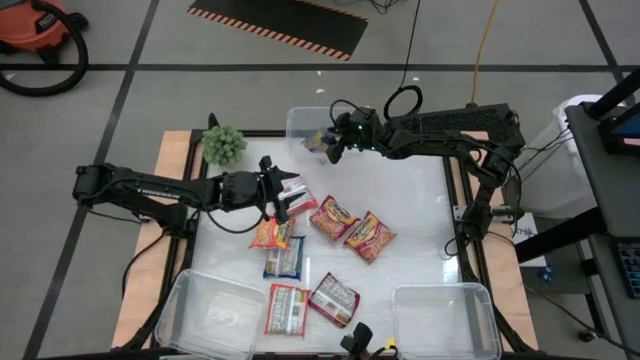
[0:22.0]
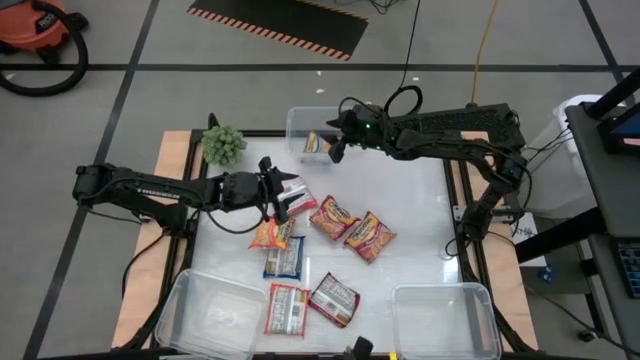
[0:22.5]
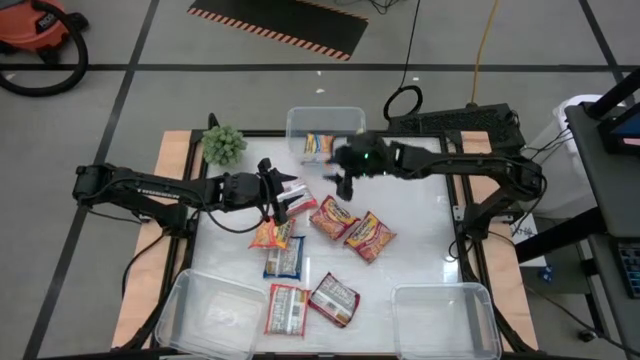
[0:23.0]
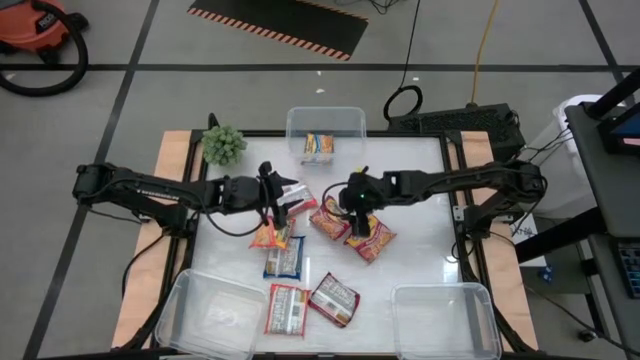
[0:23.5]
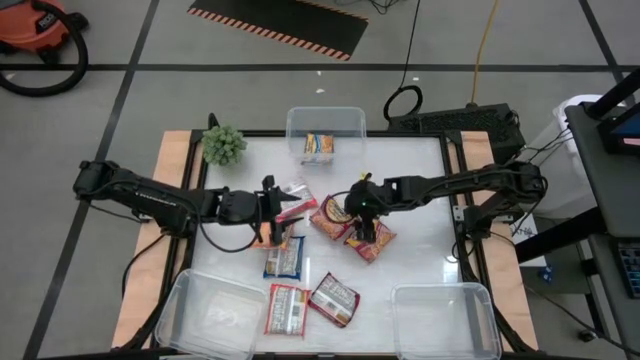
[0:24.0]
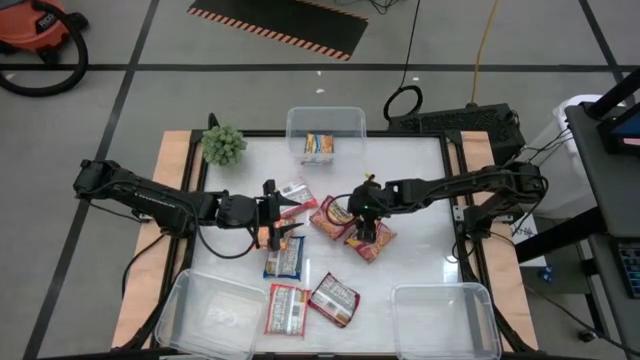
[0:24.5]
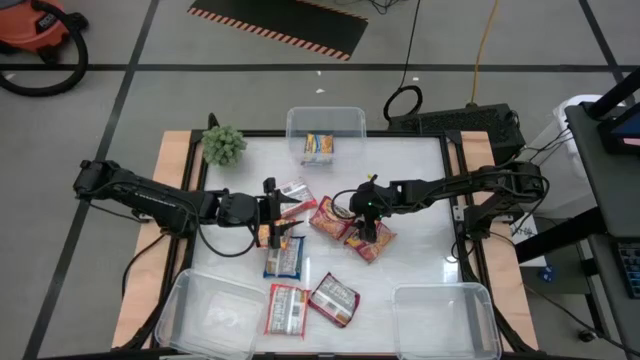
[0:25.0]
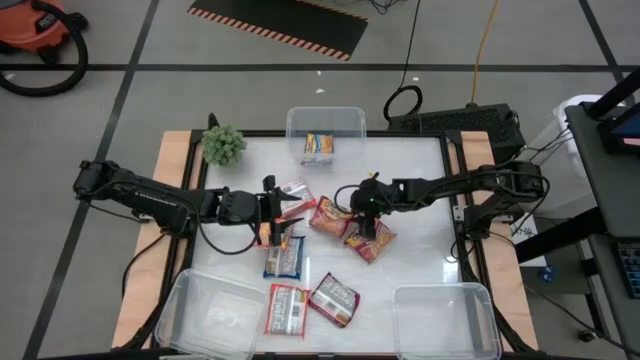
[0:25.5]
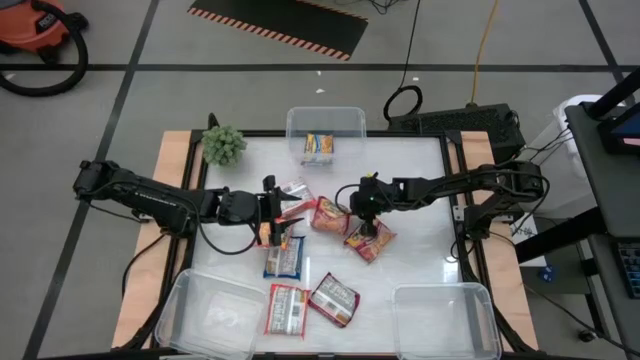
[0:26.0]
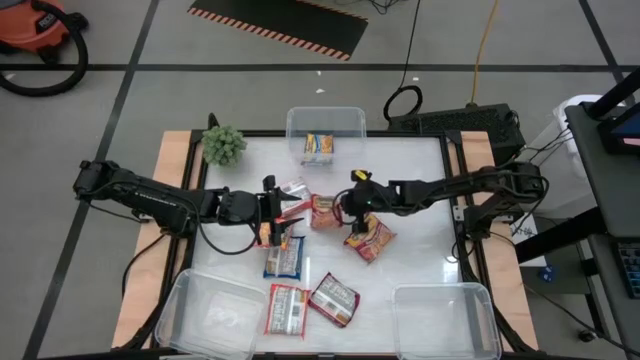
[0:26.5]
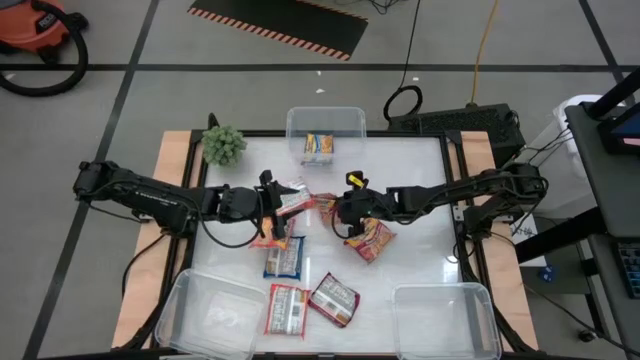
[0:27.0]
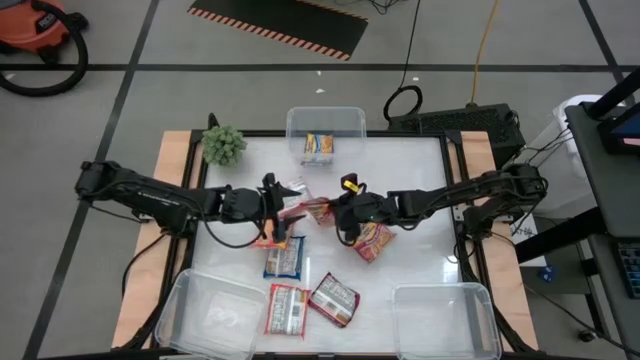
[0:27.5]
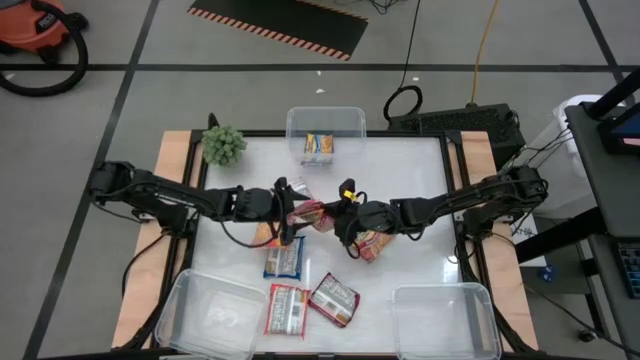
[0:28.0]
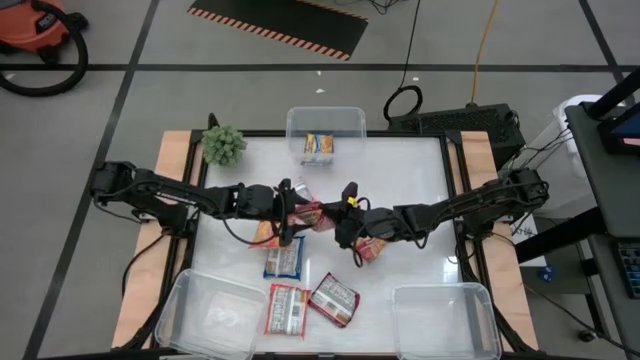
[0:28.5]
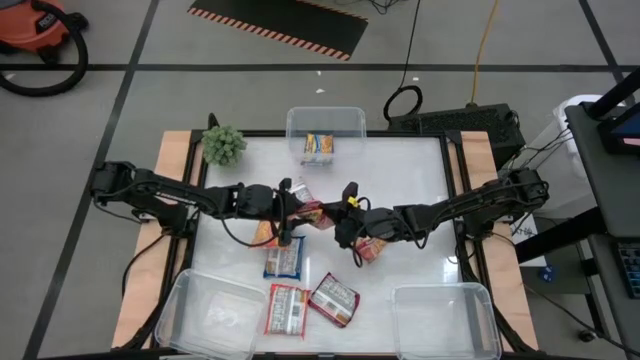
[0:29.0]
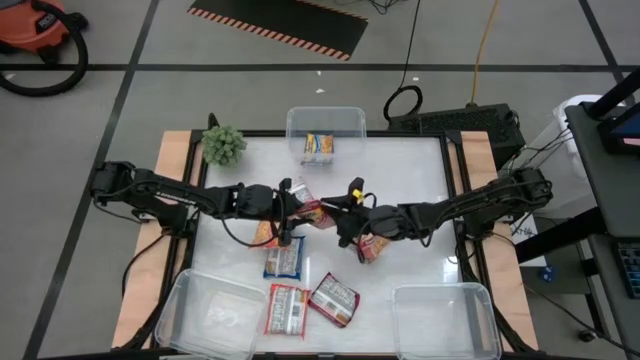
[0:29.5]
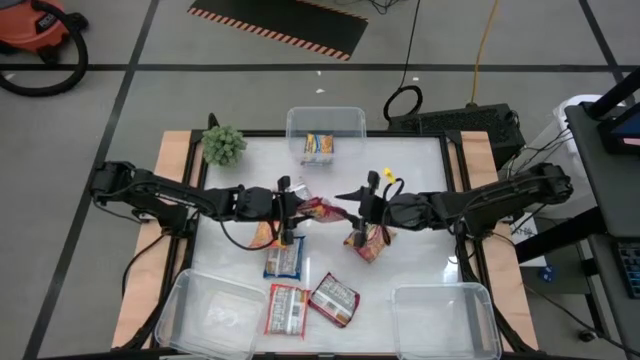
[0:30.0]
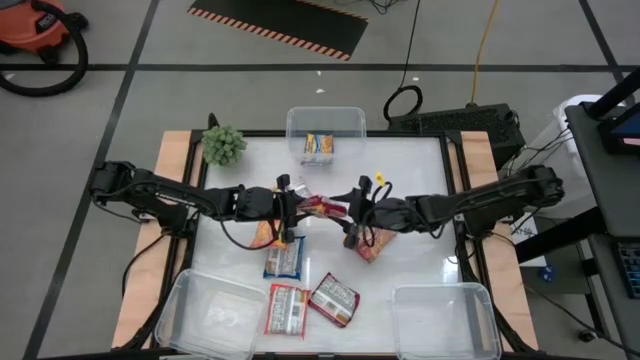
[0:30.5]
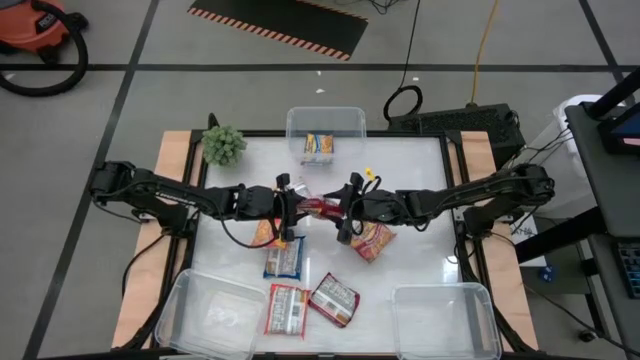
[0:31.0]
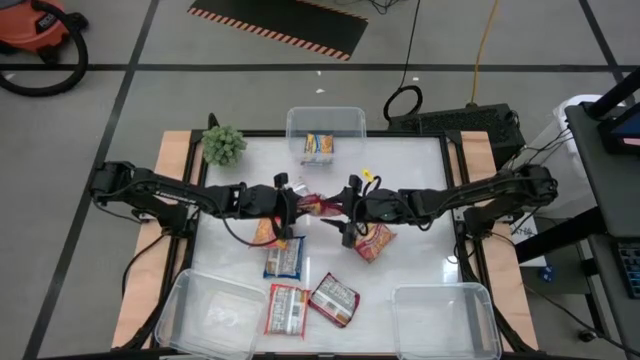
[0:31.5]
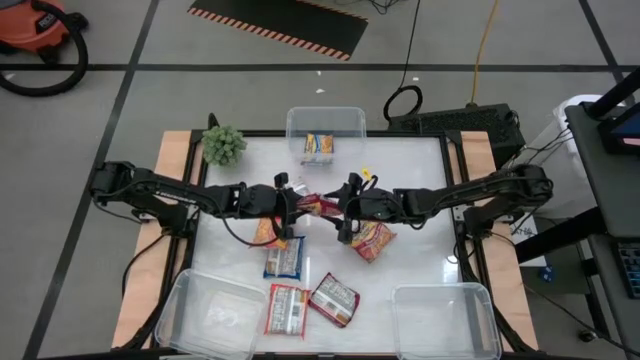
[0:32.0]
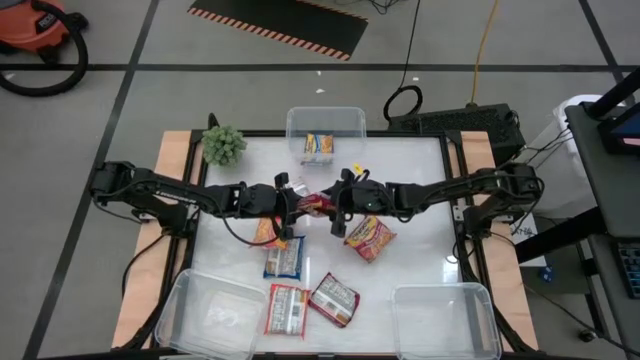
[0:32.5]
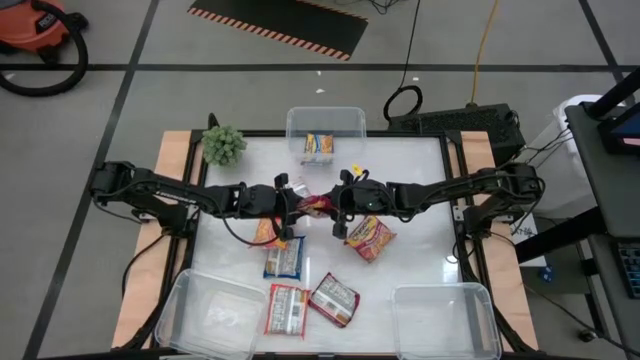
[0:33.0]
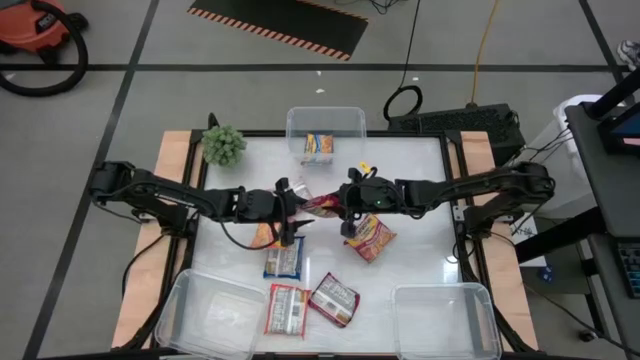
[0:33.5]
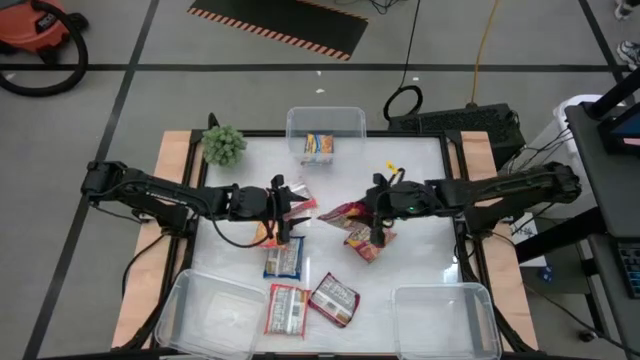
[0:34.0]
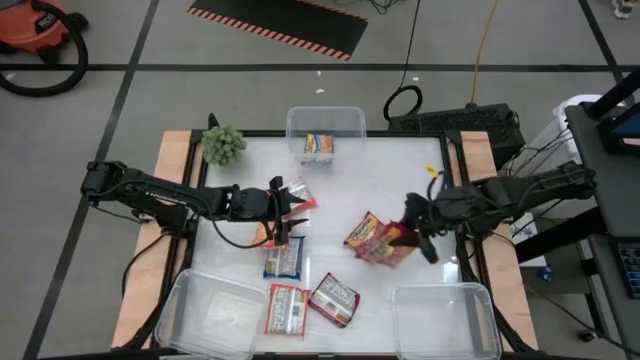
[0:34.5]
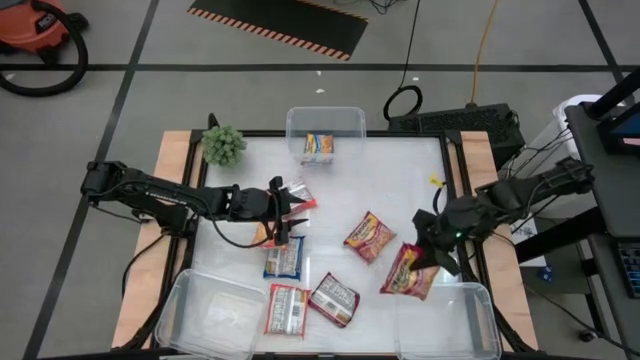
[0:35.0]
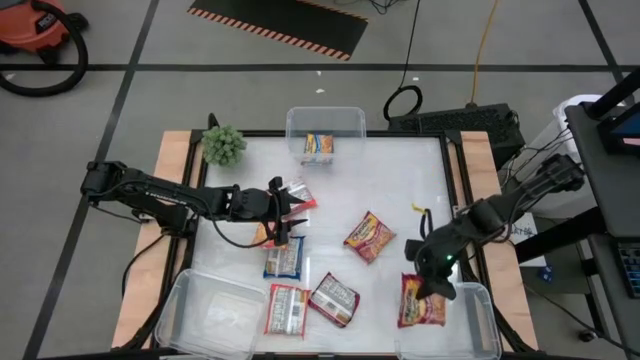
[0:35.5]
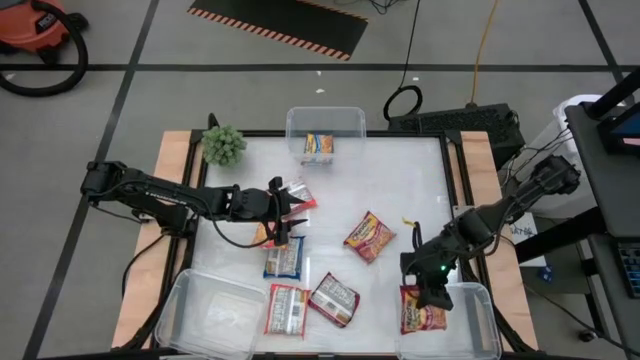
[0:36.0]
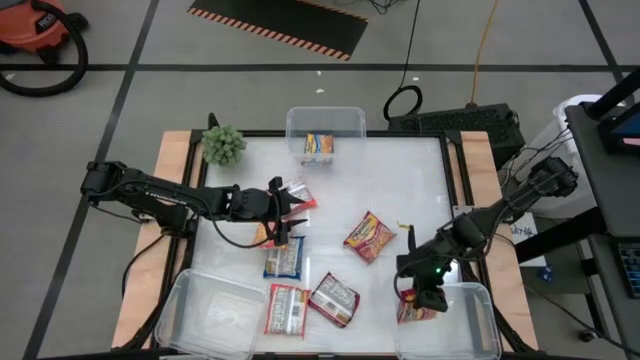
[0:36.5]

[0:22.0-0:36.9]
Task: Sort Maruchan noodles
Put the top left red noodle pack into the right transparent bin
